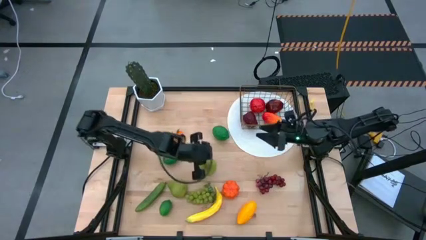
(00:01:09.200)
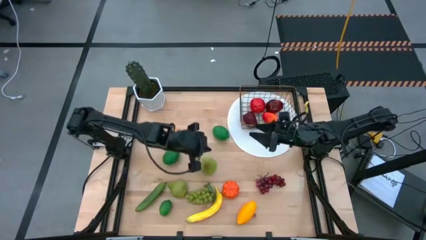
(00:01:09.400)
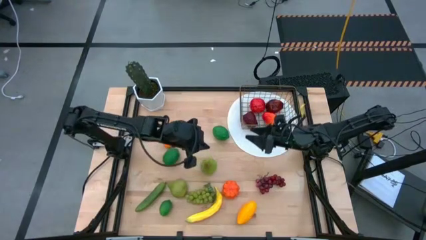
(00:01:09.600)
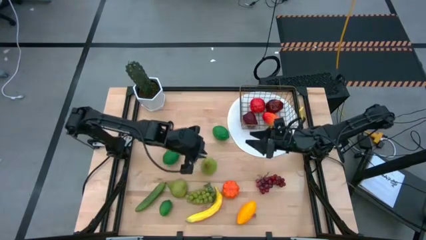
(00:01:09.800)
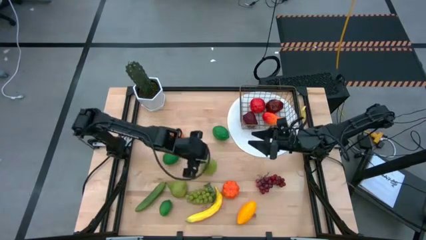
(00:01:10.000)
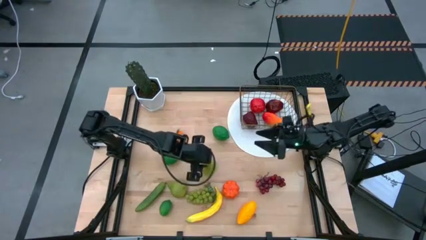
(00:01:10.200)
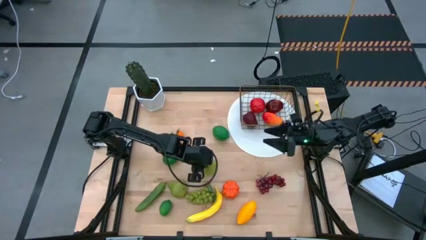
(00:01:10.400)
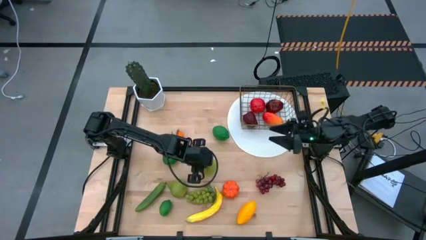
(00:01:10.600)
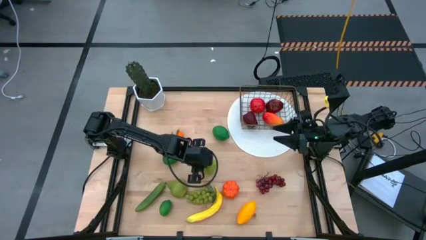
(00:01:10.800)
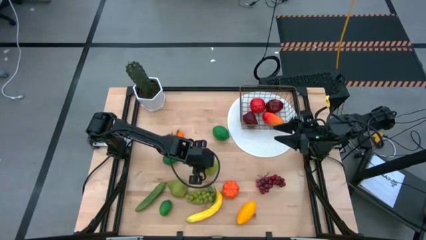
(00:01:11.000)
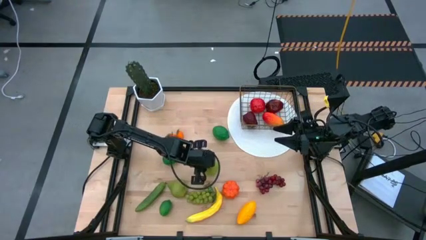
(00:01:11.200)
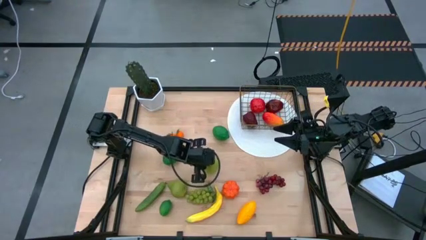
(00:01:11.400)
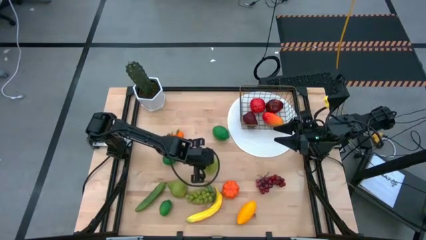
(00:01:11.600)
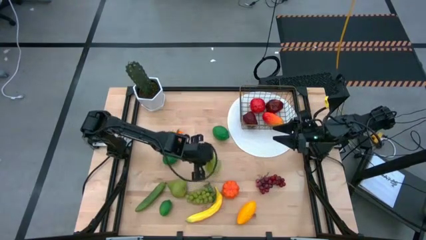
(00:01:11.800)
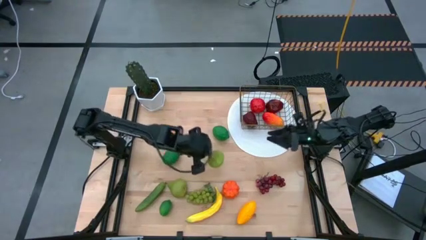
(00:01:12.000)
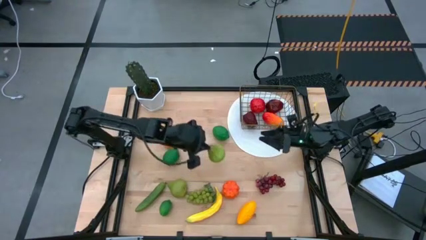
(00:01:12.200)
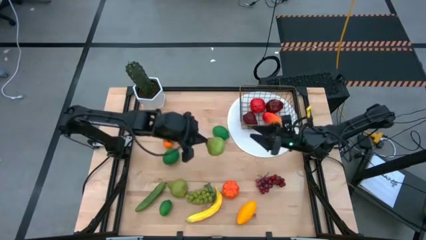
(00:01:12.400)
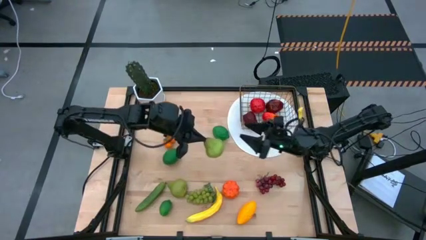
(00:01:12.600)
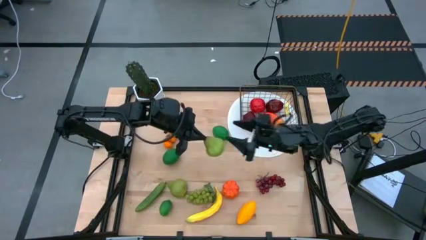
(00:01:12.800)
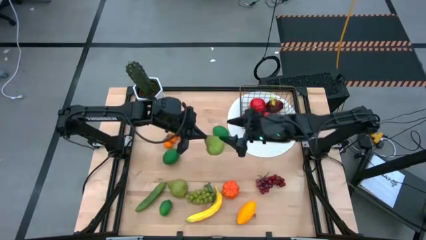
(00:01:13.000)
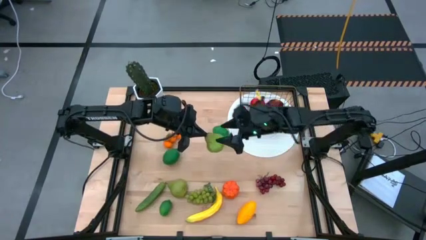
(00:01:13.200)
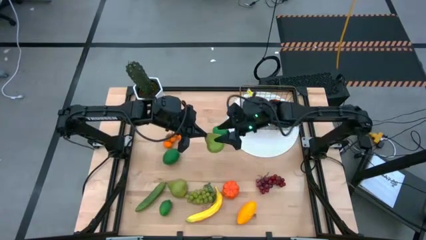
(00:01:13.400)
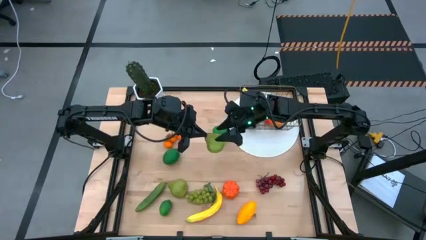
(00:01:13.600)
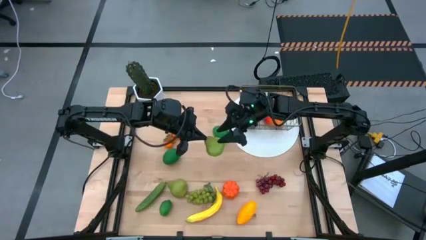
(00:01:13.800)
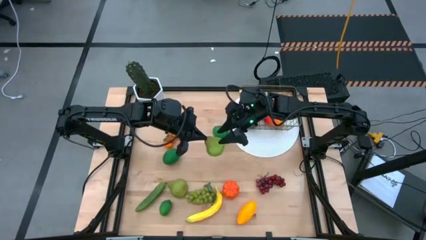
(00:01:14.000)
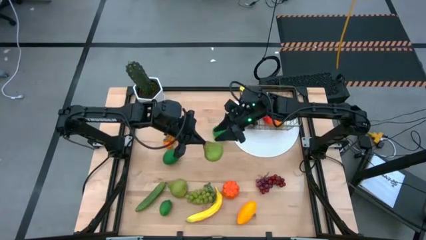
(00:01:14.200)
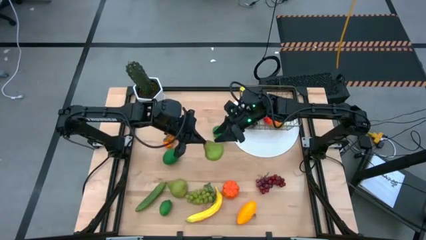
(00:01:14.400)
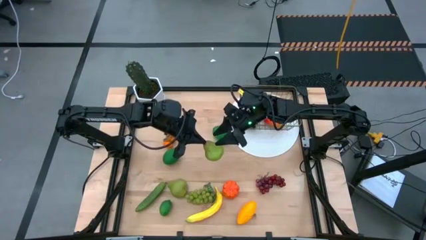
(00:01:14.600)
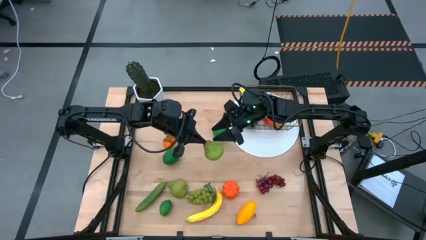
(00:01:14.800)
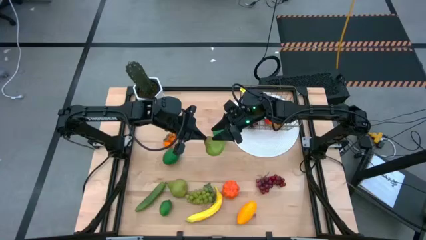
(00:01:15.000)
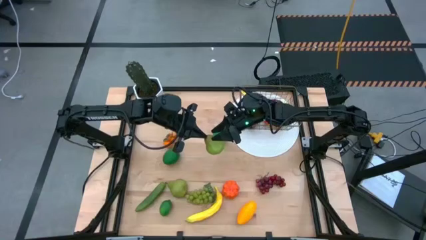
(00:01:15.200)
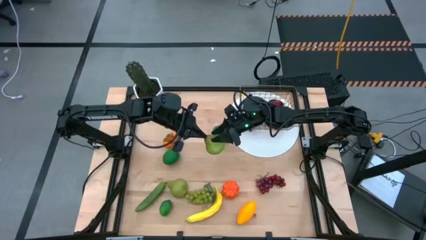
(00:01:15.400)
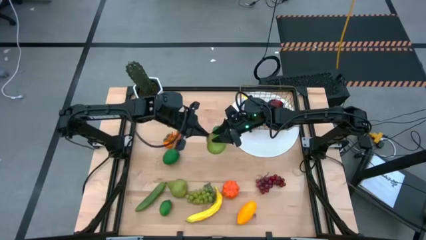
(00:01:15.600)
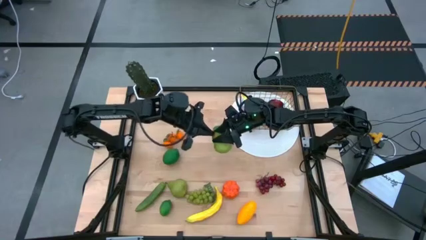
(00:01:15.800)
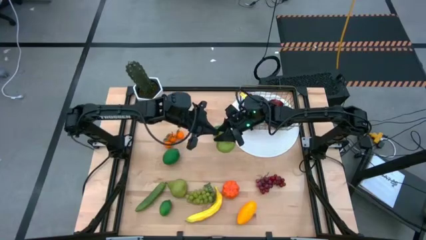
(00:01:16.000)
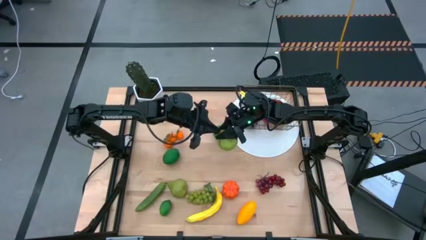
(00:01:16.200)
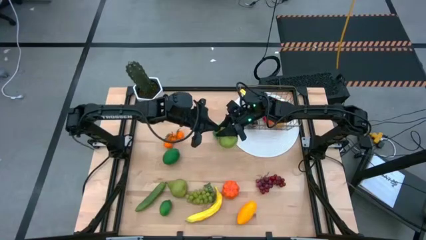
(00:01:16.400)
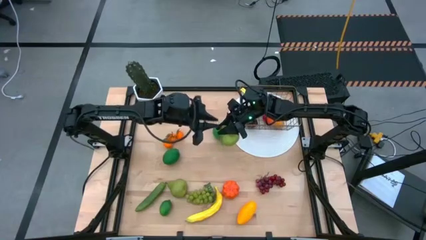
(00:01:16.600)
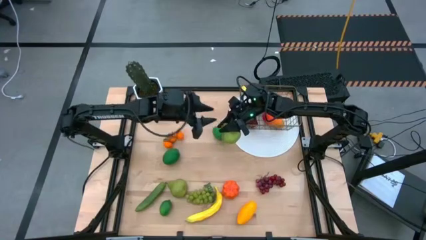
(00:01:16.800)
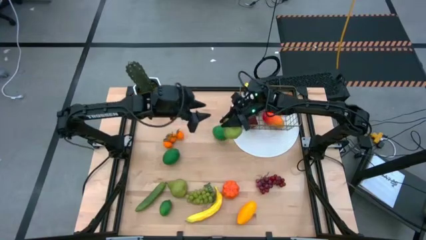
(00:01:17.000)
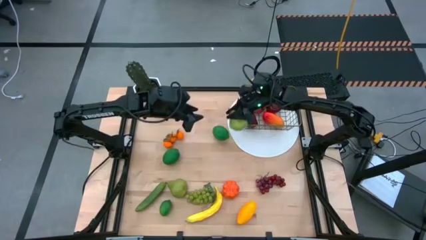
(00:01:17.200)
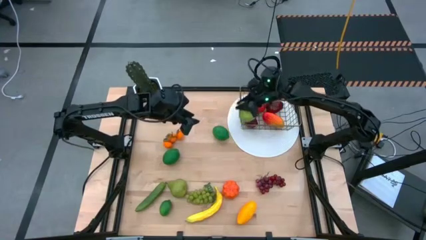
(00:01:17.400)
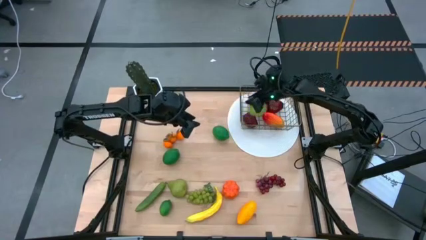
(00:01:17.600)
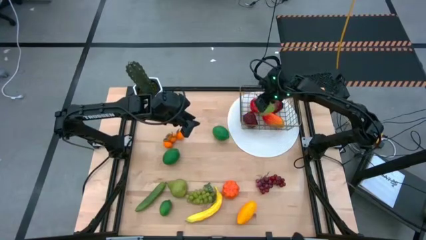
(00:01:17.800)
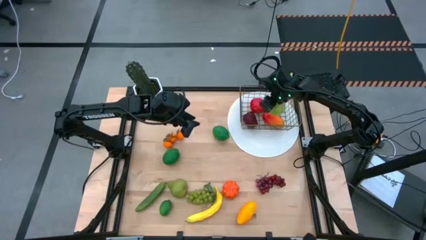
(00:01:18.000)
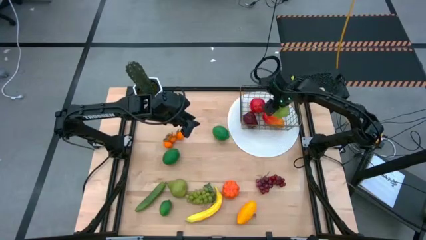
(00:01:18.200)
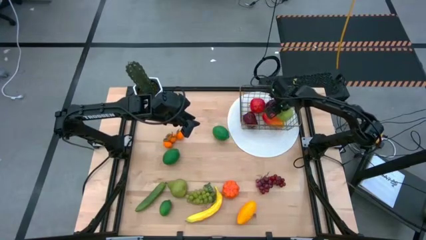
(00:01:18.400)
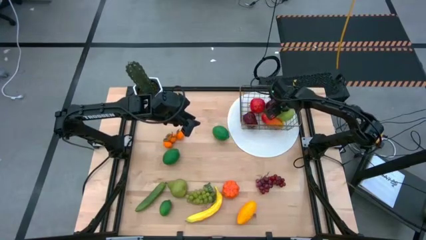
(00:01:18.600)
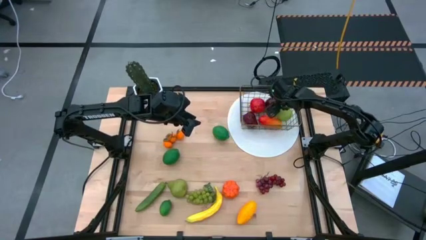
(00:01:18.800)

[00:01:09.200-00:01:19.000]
Task: Build produce basket
Put the top right pear into the gold wire basket
